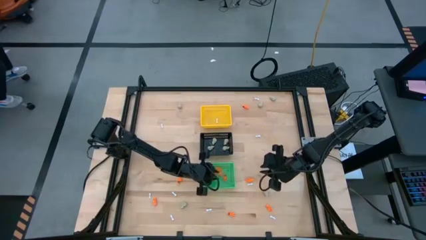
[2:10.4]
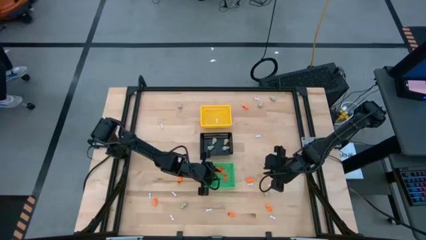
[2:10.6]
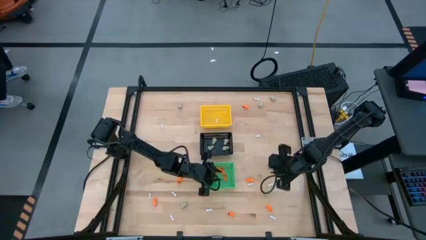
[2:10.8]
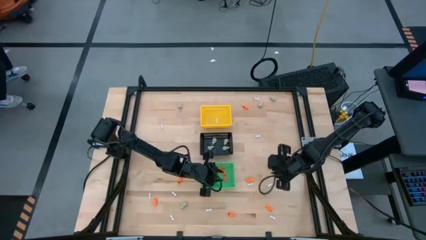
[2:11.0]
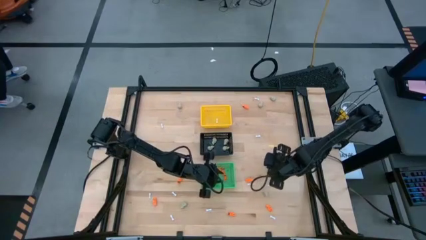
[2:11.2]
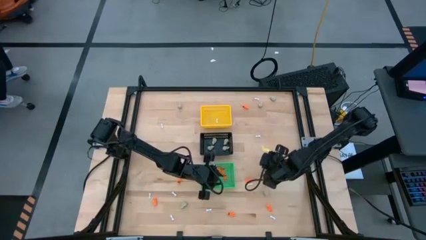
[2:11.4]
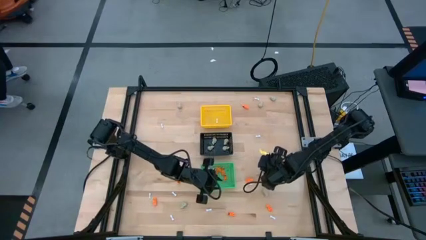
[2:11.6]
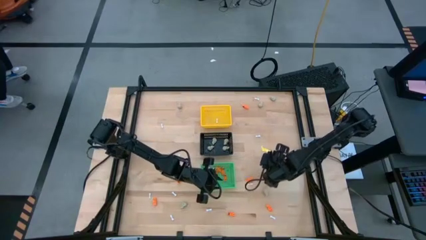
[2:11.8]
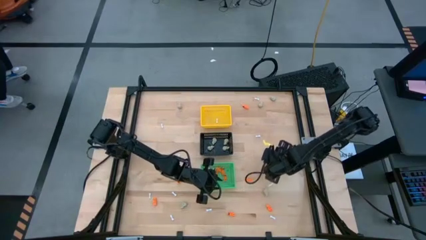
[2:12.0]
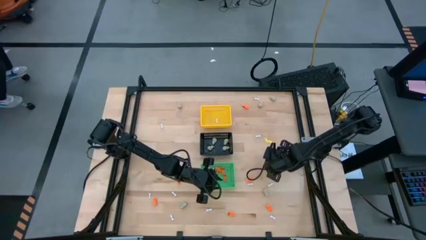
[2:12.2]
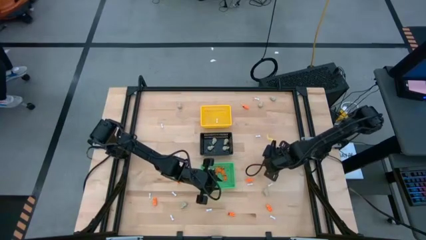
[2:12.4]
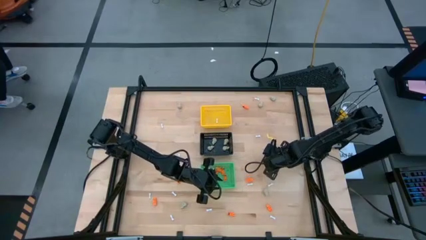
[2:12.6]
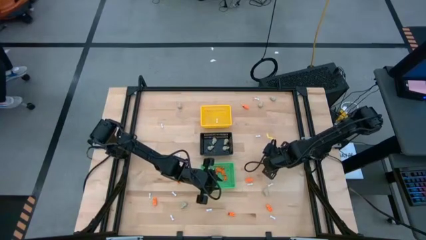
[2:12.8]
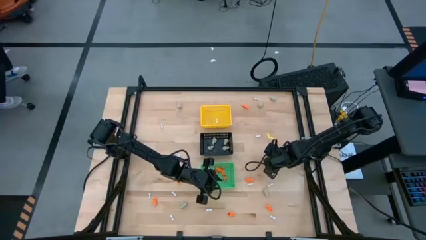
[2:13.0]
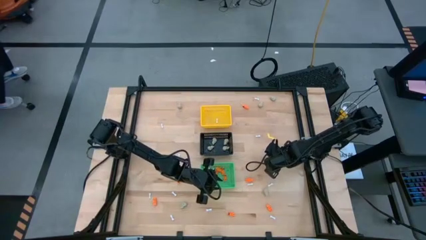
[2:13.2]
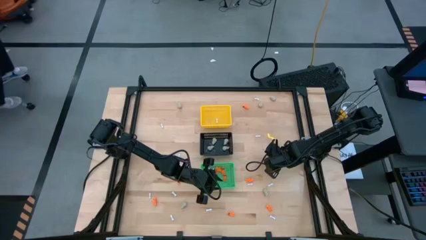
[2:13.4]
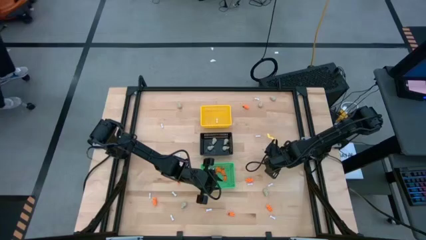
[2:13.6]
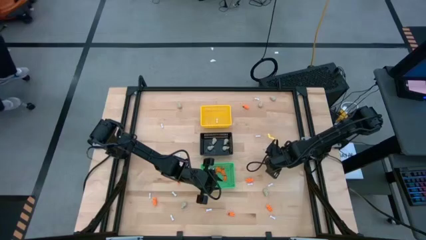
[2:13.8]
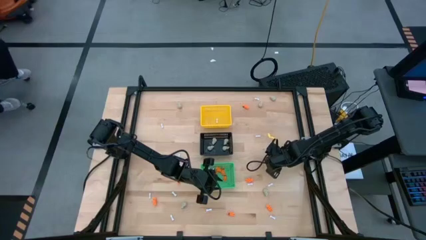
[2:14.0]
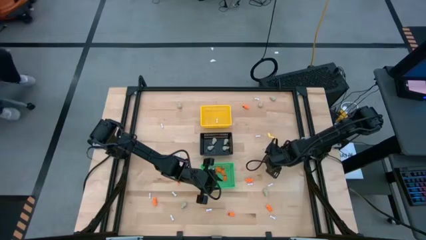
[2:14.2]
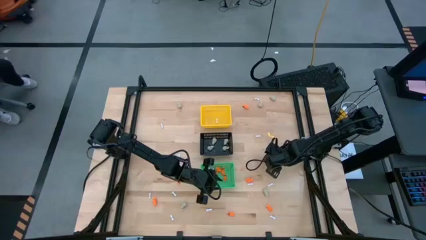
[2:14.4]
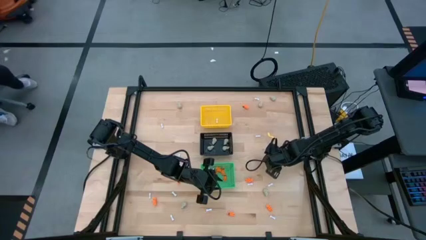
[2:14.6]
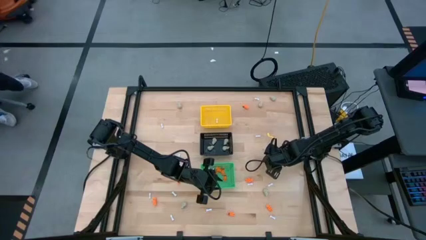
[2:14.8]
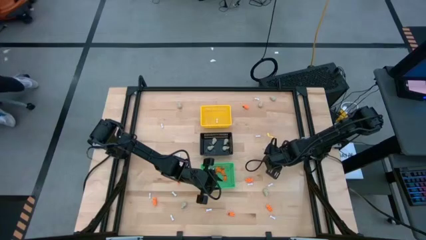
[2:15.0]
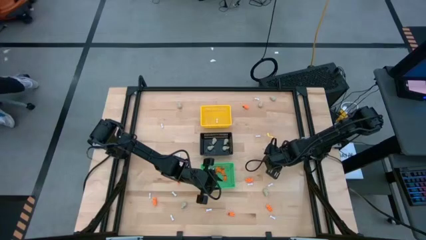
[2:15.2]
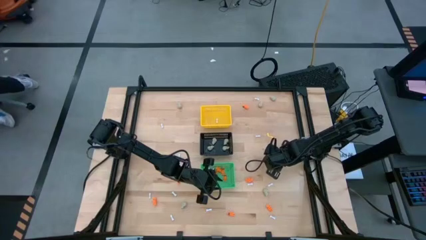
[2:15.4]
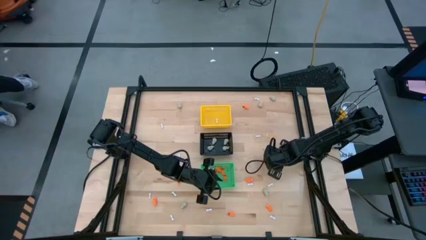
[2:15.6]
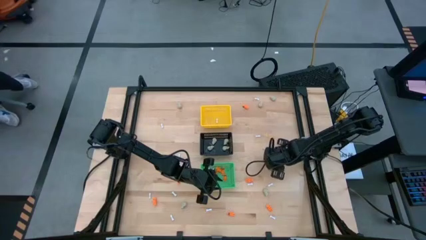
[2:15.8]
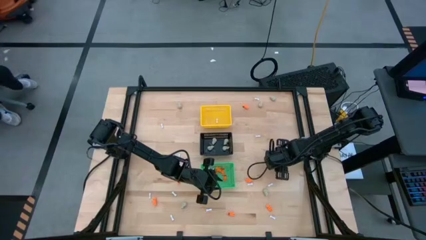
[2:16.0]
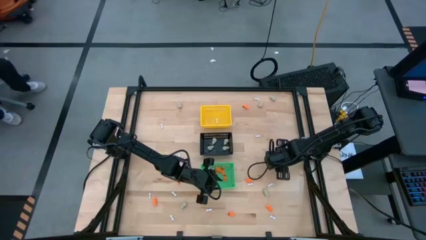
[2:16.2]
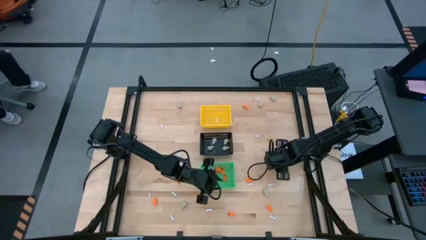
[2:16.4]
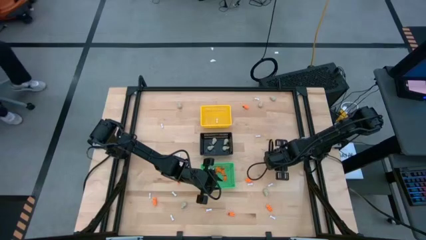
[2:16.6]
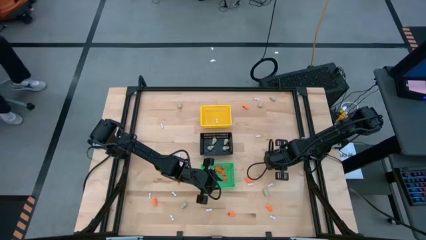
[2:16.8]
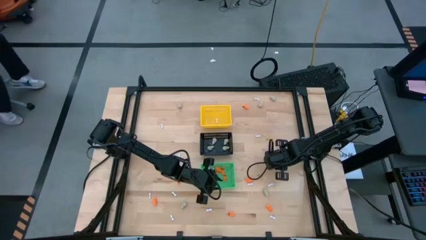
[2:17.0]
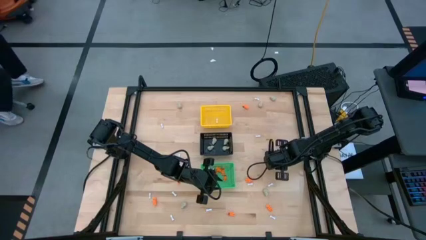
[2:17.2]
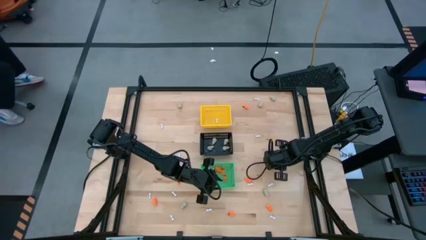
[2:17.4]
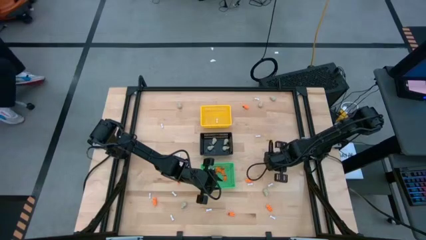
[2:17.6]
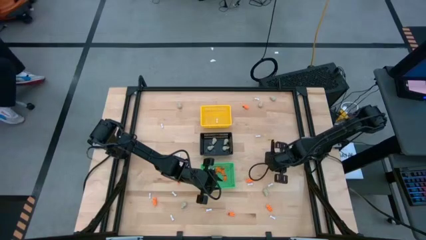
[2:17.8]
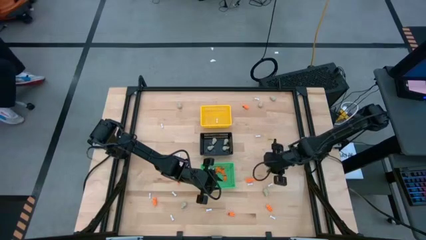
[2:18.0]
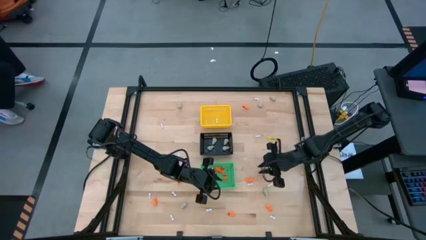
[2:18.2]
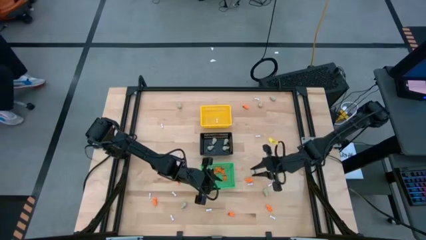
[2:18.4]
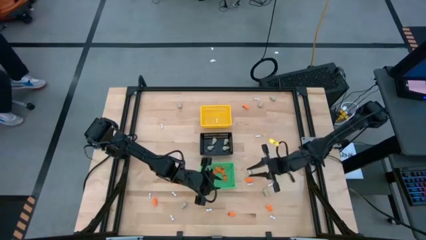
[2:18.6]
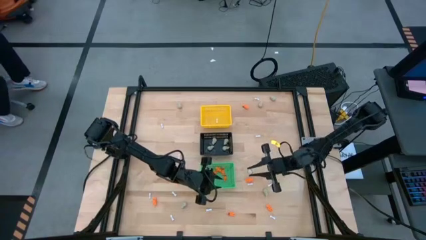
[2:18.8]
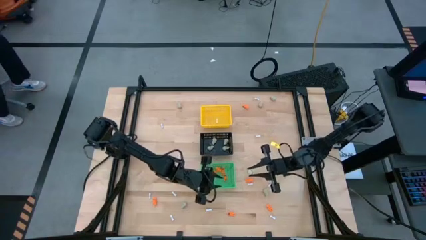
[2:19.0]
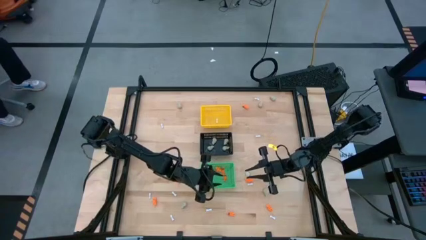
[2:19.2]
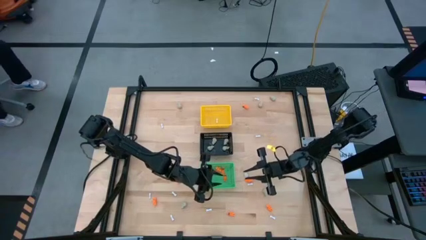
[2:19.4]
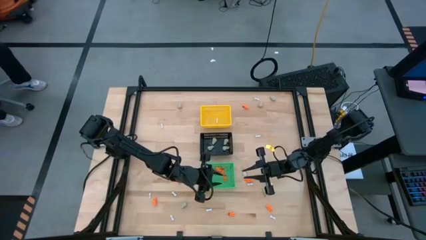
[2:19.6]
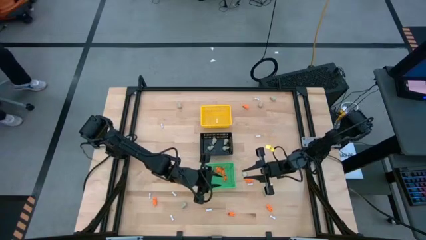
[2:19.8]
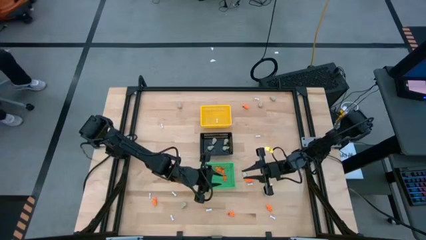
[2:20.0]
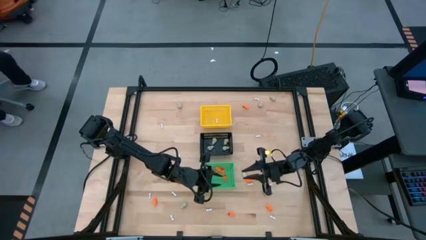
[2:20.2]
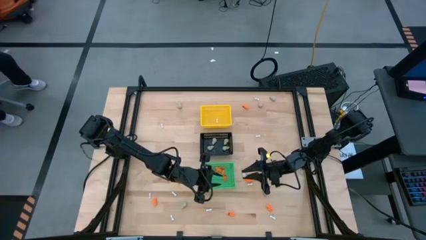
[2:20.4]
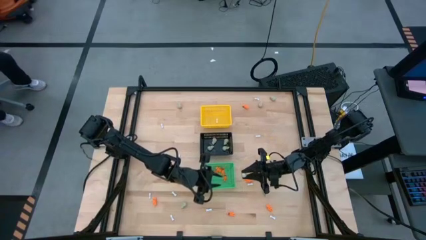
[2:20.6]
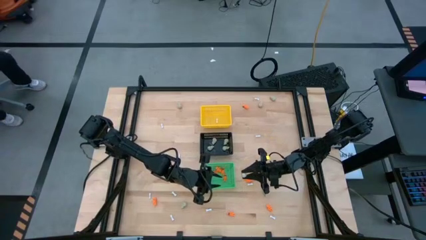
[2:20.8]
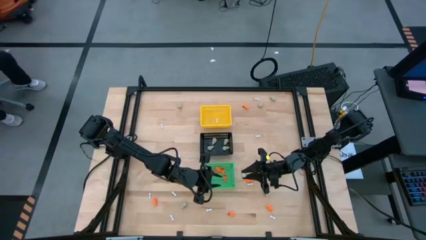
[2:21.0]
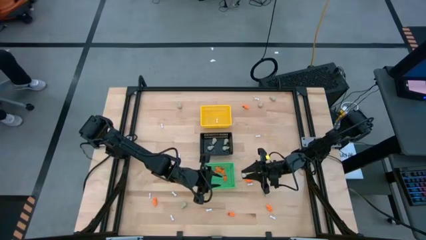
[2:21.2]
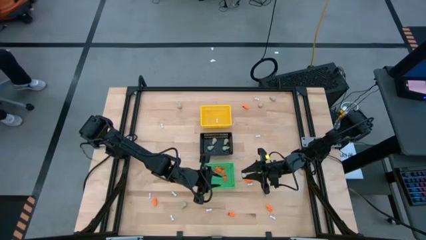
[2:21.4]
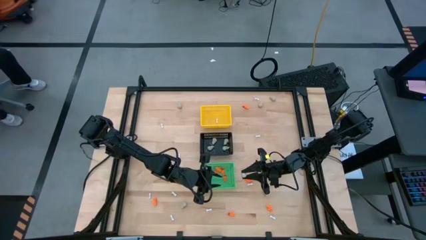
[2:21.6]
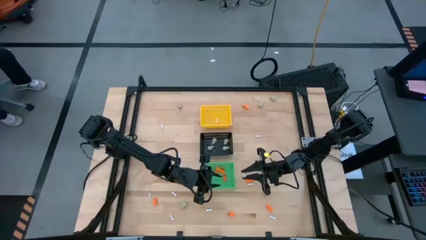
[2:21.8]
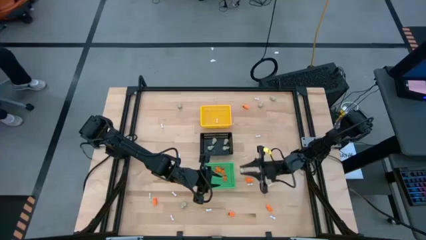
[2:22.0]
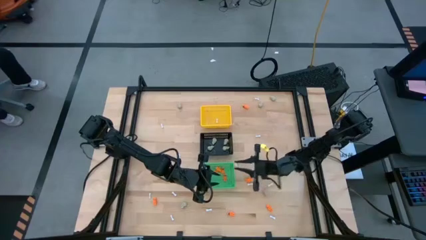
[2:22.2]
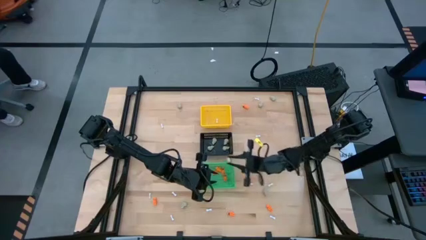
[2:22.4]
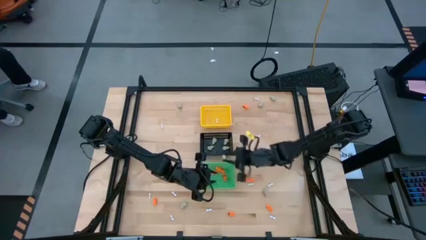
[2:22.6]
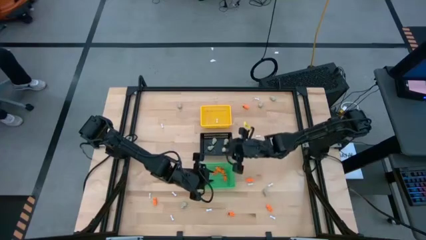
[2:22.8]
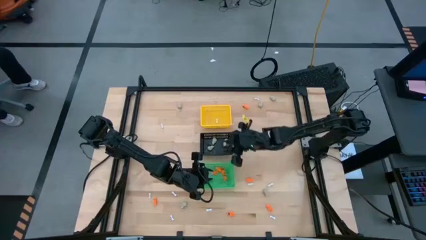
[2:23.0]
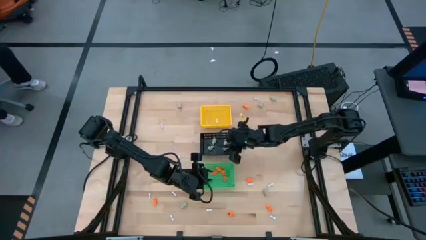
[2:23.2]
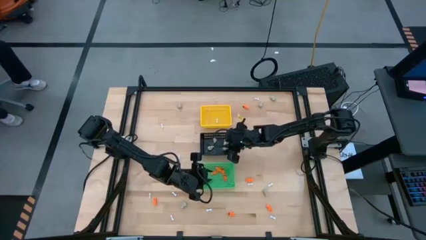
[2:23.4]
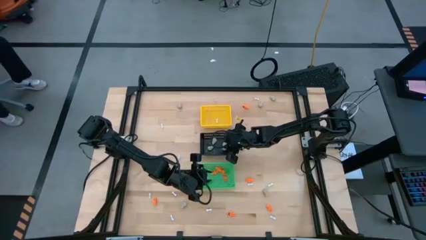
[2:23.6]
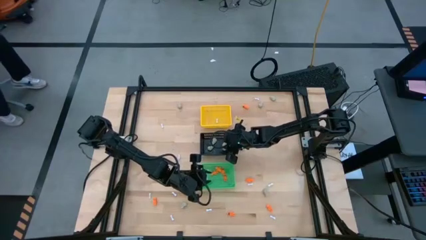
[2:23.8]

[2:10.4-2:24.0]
Task: Sort Halloween decoration
Put the gray skull toy into the black basket
